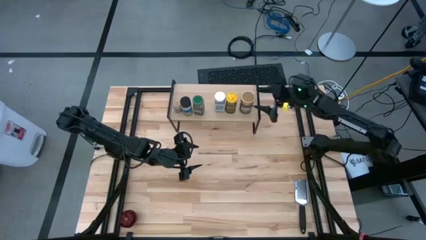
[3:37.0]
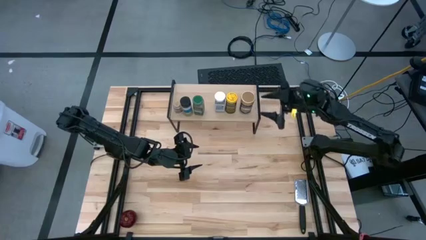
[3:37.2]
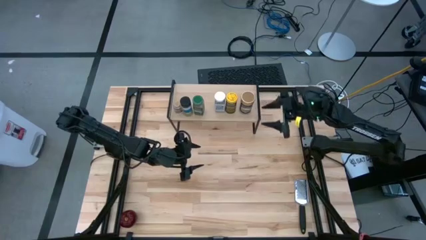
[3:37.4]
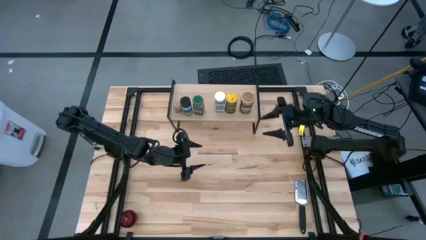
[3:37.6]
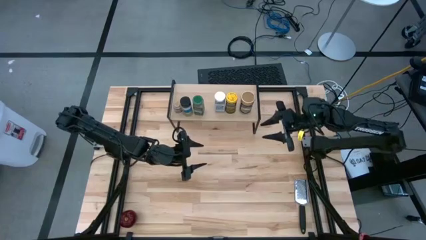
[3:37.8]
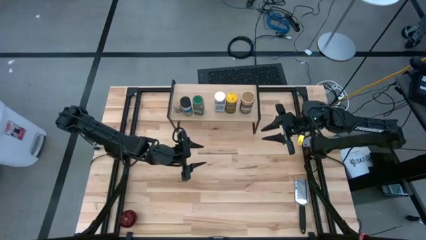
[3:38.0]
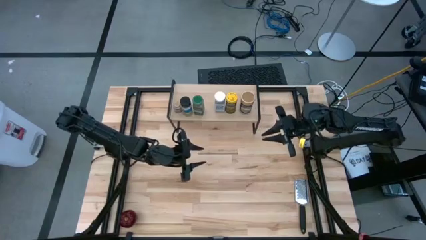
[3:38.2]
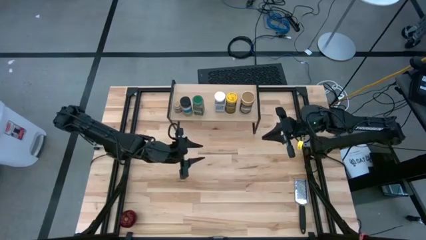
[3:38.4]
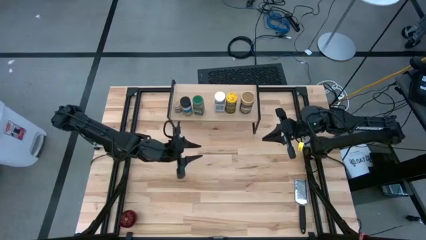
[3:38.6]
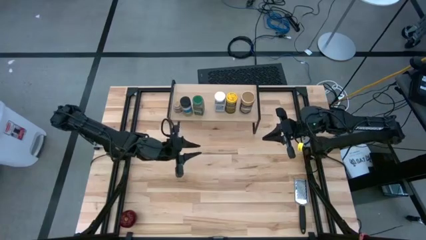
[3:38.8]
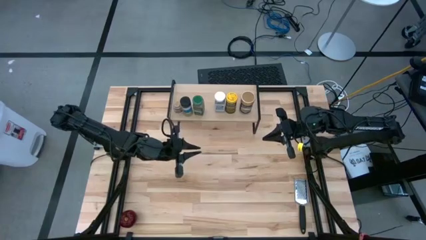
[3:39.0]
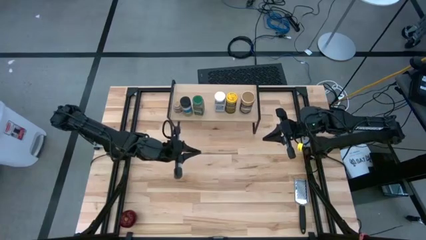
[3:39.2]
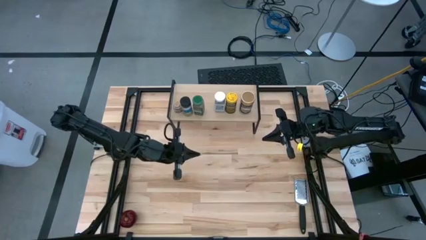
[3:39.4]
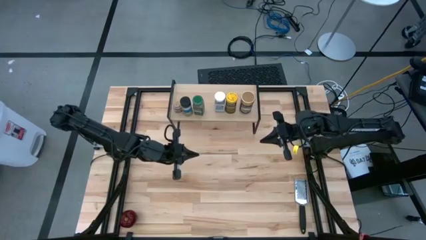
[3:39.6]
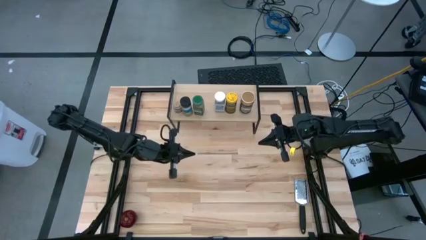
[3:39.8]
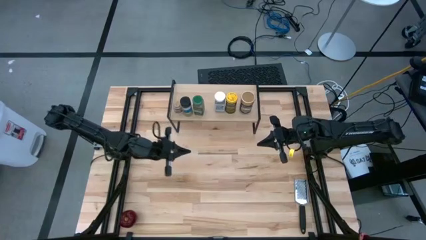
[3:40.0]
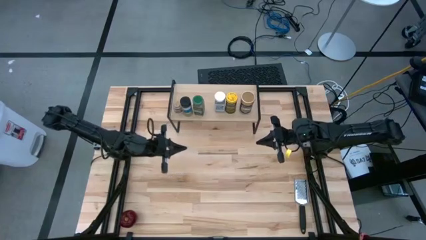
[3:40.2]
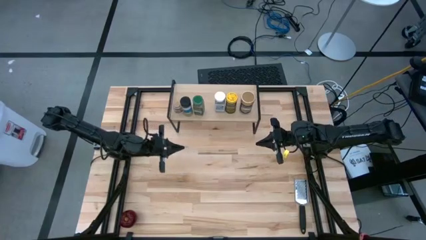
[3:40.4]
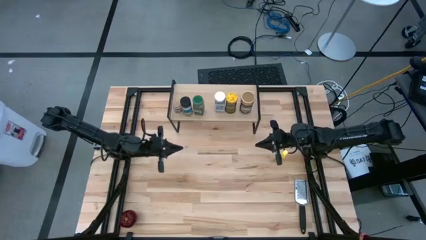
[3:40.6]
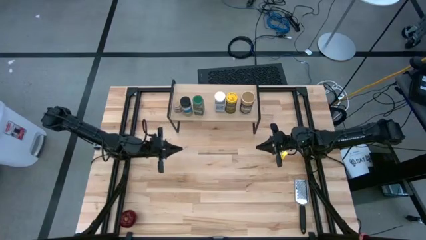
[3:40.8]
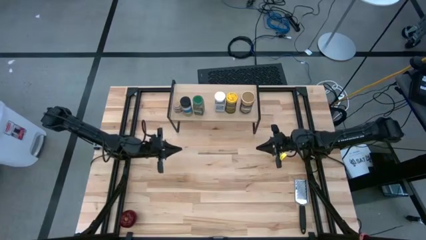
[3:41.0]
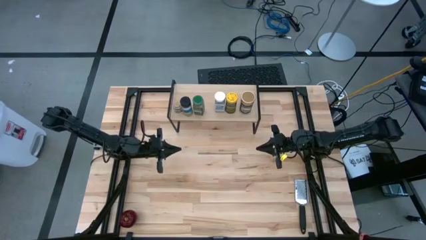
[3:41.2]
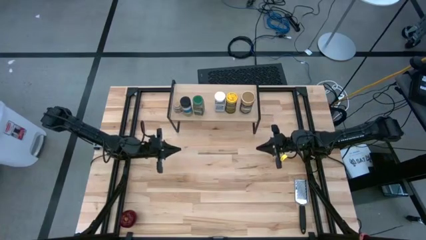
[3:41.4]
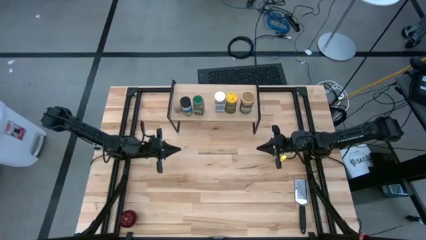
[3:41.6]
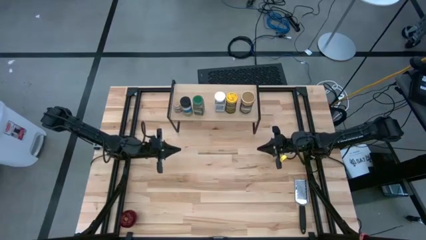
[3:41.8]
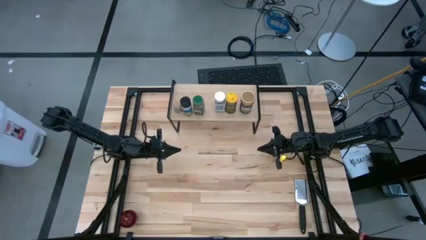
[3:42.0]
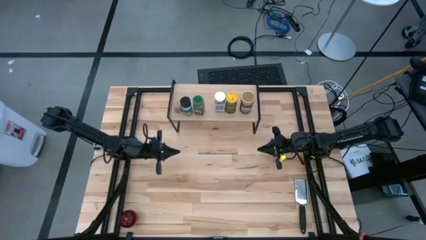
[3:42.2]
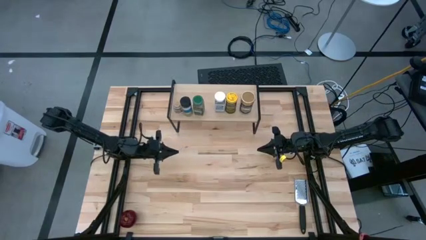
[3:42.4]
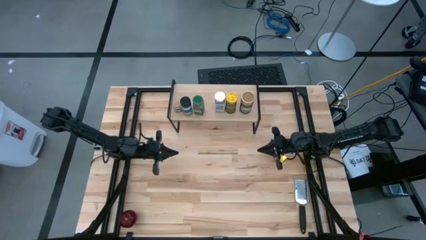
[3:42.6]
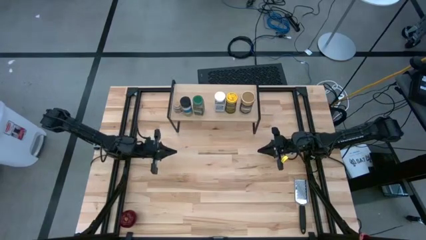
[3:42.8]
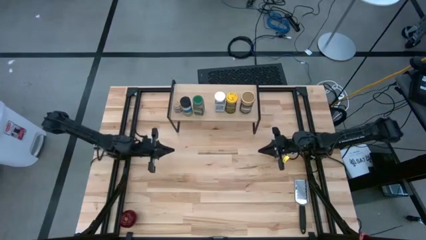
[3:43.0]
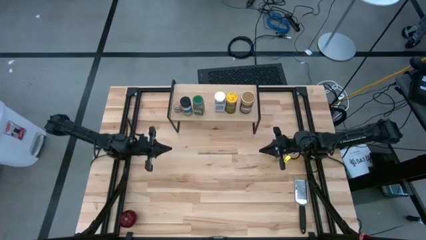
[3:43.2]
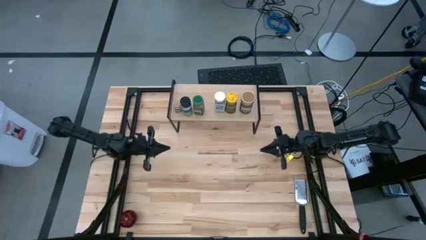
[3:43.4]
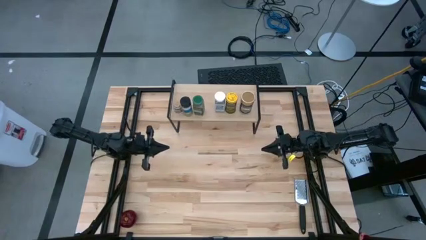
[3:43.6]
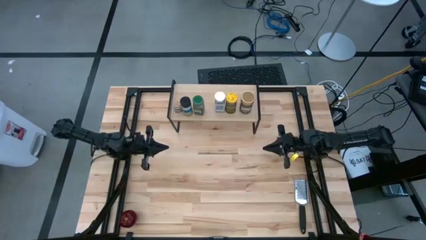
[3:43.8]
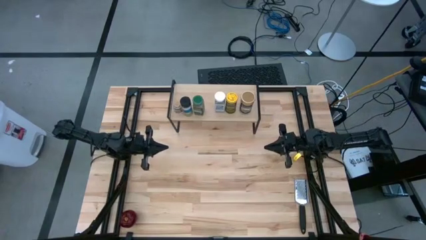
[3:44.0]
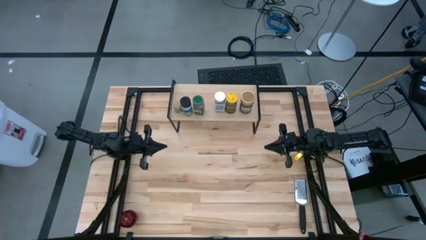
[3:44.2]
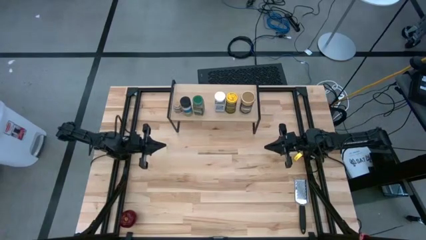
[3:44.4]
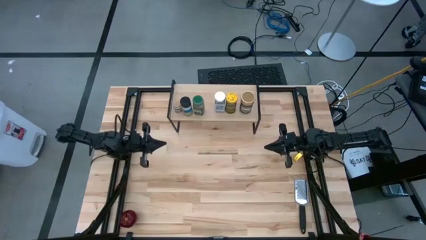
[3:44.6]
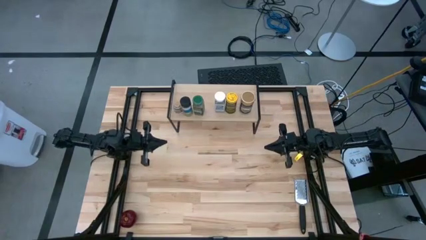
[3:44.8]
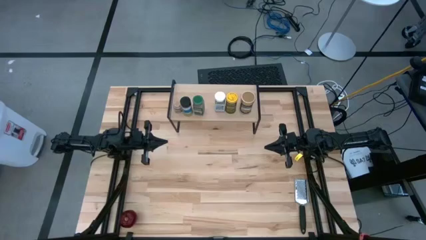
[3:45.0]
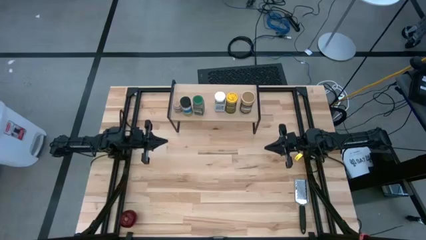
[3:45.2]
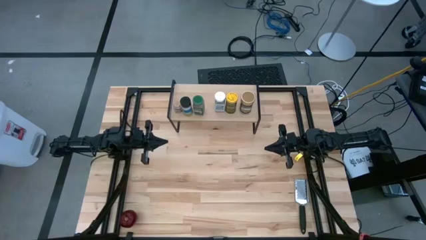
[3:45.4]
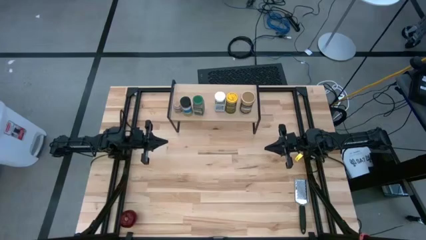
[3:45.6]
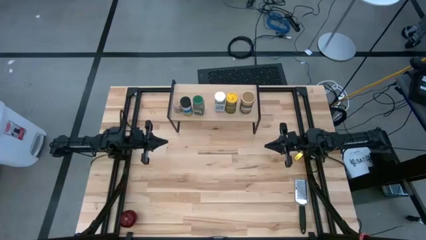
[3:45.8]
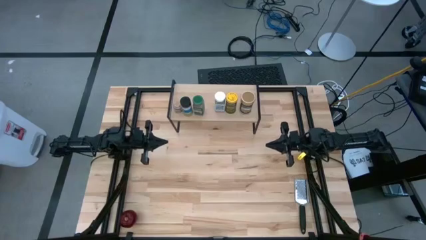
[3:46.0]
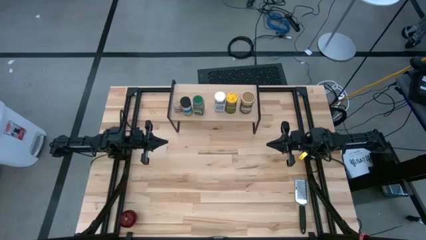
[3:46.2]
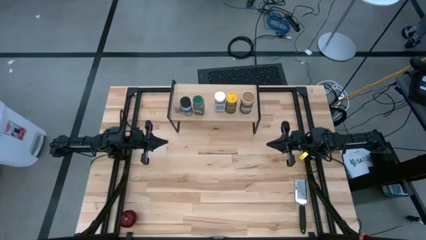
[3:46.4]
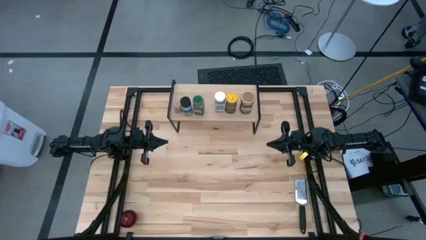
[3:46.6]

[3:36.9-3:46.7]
Task: Shelf spices
Return to Home Position

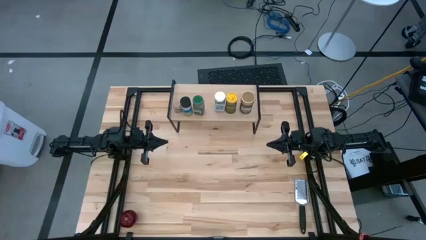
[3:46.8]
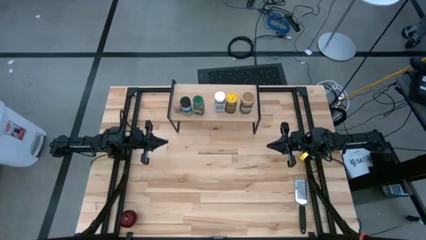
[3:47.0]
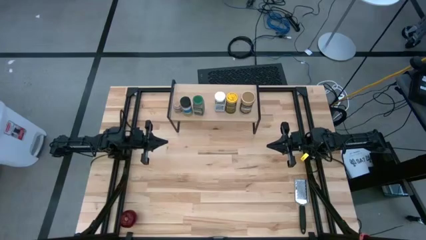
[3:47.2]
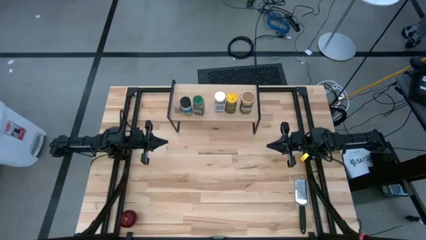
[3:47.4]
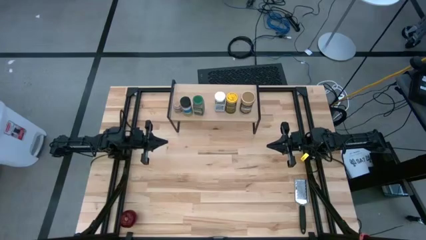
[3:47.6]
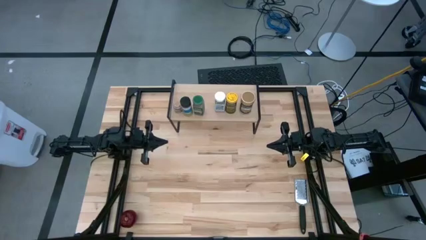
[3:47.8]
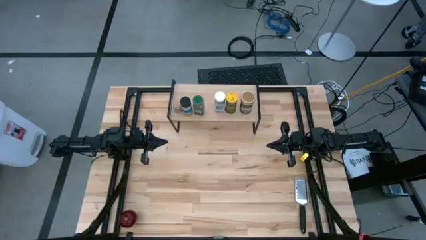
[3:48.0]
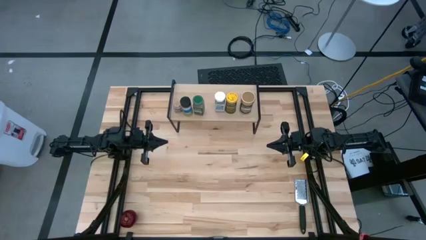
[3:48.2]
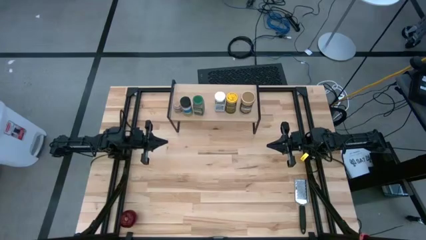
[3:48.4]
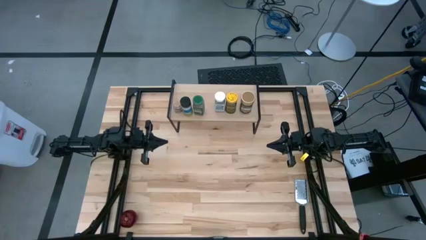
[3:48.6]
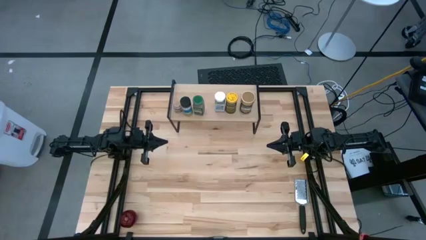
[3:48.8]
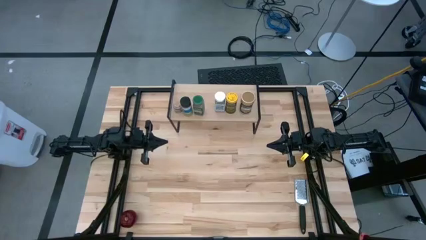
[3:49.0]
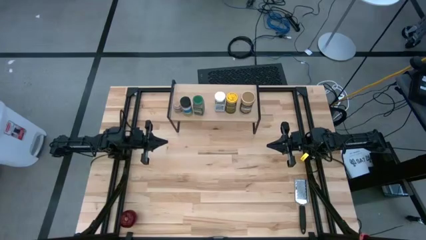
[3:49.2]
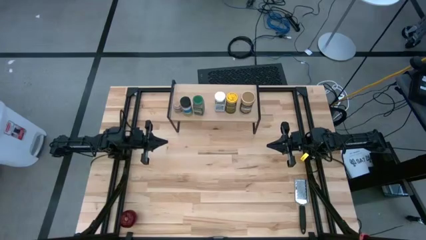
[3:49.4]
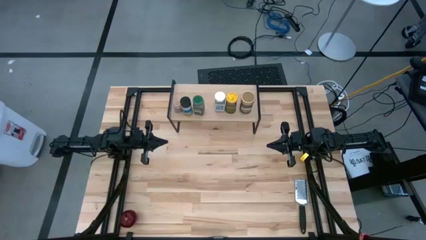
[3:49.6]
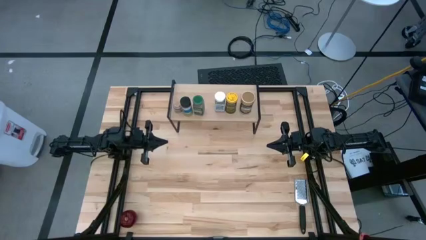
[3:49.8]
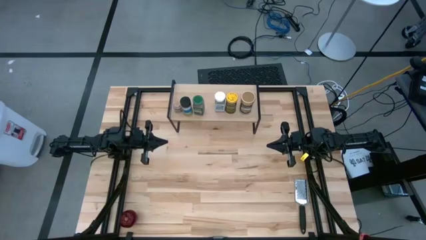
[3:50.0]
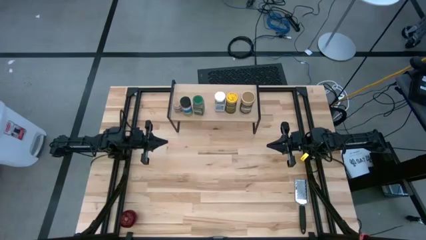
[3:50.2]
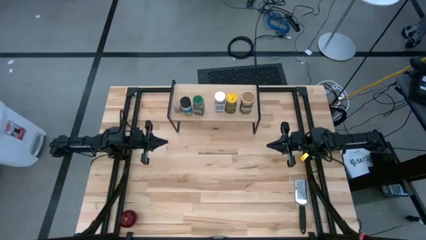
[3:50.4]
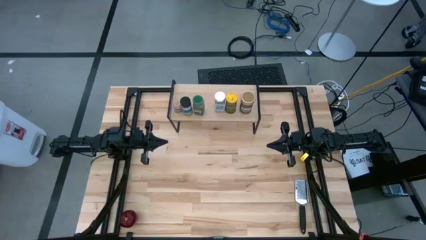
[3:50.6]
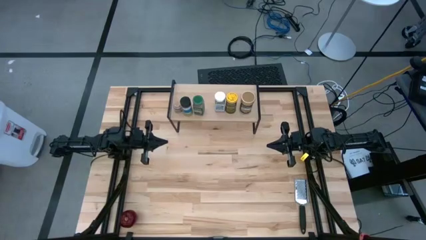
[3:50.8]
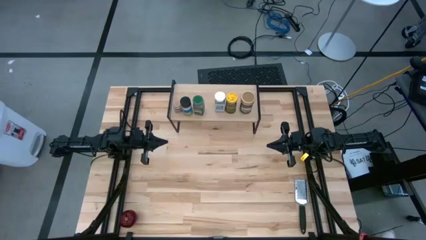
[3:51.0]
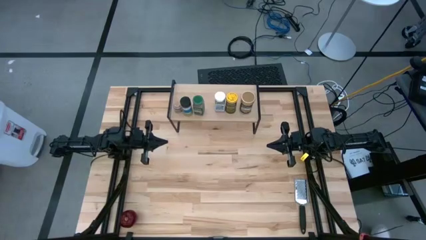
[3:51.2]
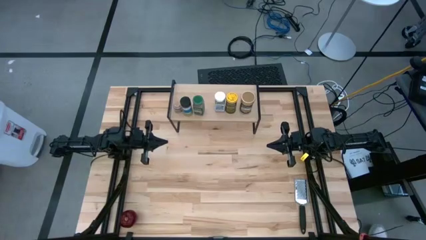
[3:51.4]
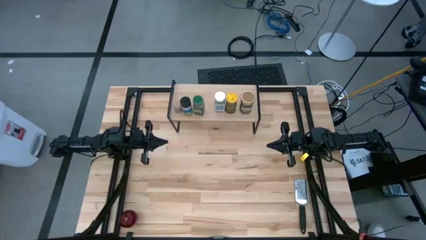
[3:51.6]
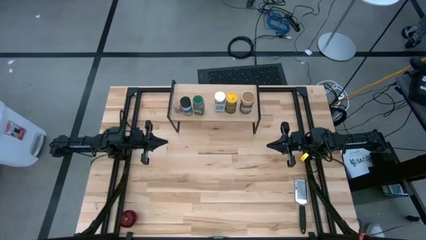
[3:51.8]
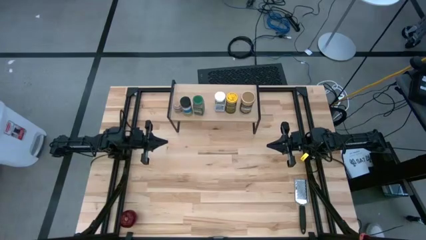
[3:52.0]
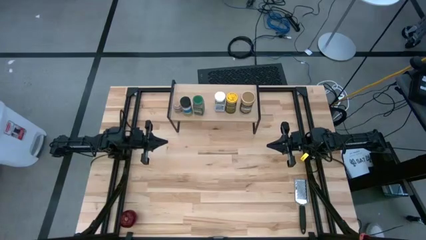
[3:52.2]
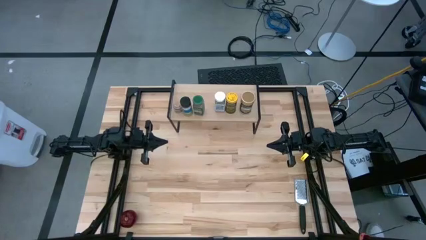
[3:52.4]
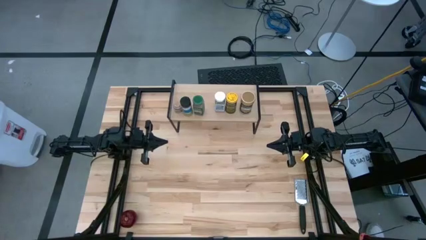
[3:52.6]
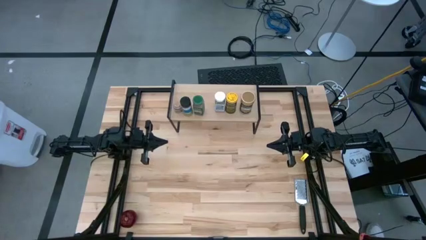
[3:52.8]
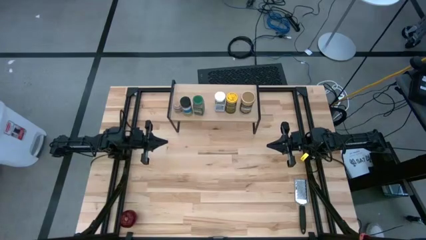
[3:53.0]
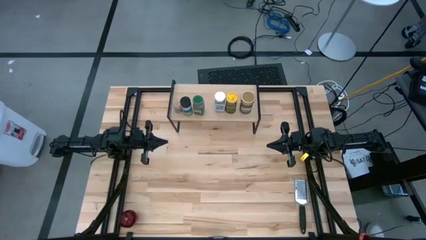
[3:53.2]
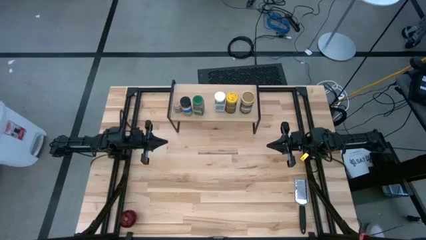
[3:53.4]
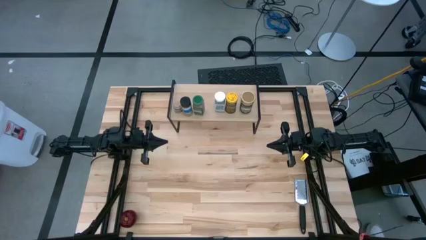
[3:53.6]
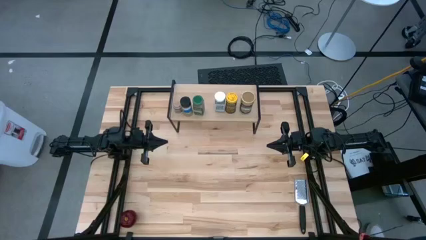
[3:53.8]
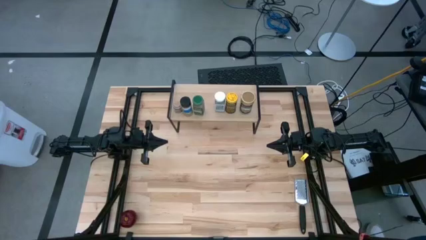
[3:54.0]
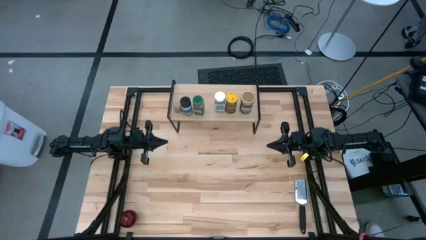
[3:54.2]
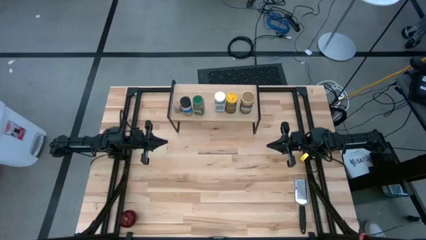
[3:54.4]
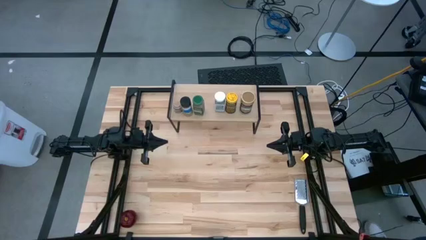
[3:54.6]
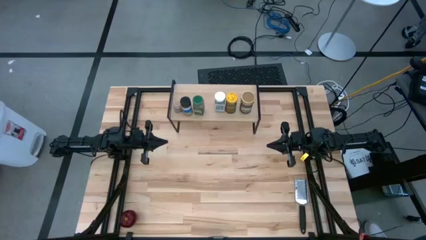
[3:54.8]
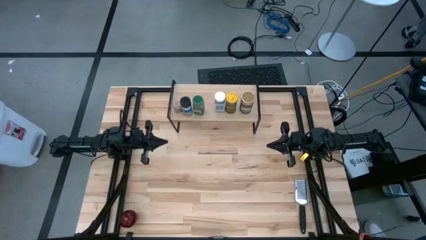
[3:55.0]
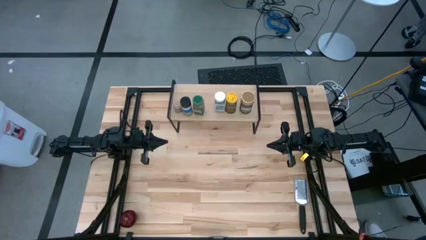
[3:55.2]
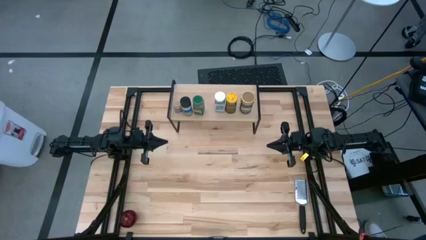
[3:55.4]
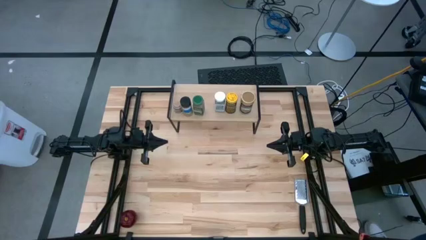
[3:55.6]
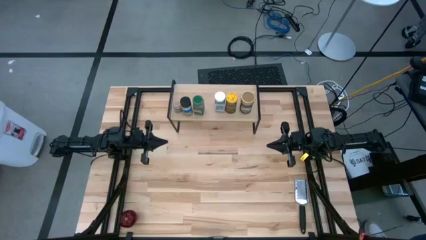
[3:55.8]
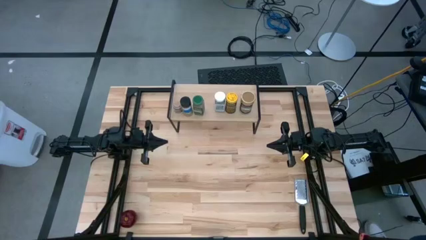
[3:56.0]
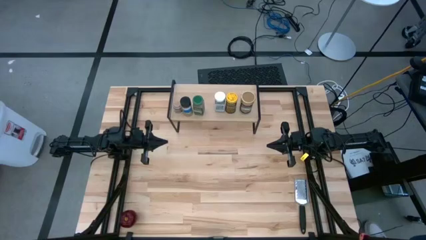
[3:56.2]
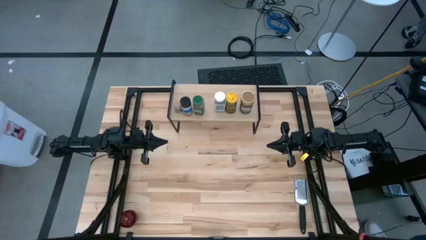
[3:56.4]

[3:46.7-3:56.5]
Return to Home Position
